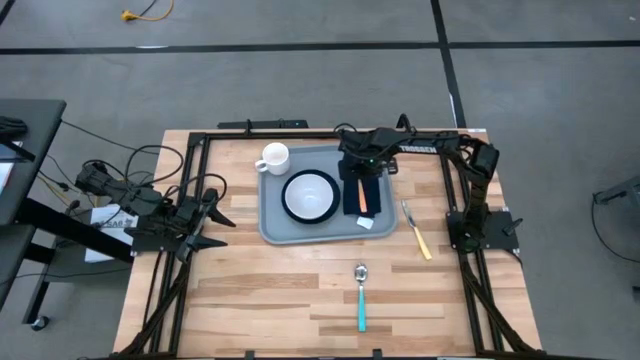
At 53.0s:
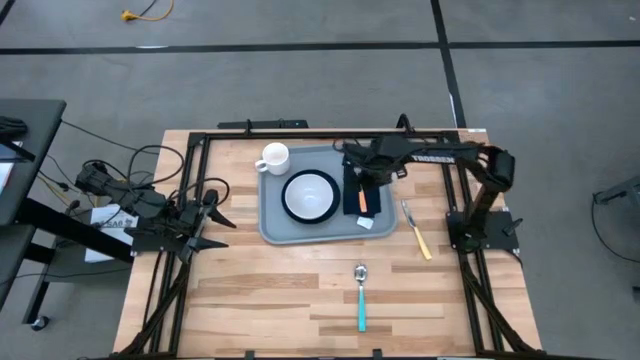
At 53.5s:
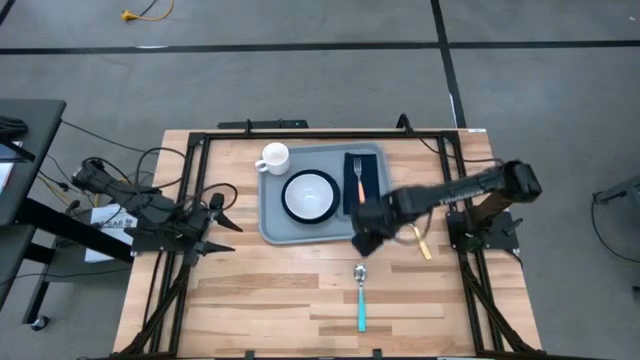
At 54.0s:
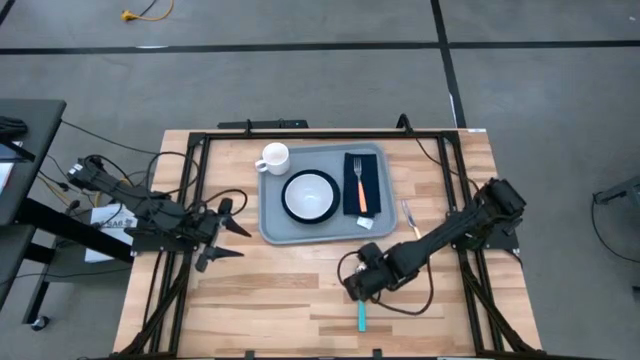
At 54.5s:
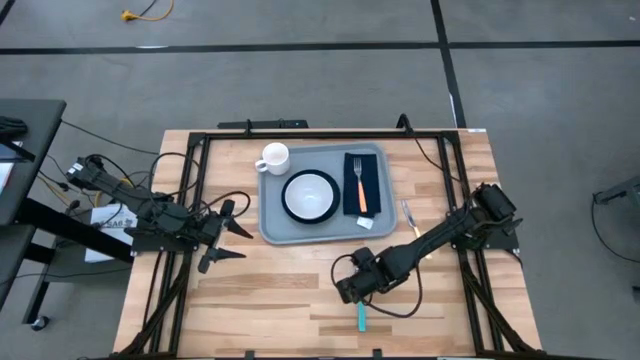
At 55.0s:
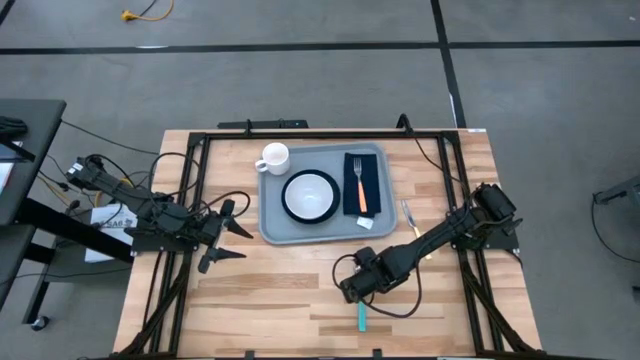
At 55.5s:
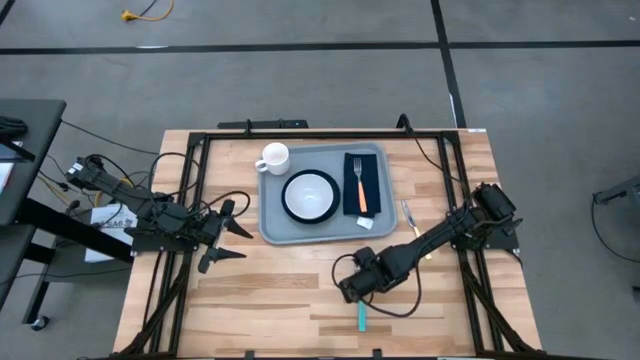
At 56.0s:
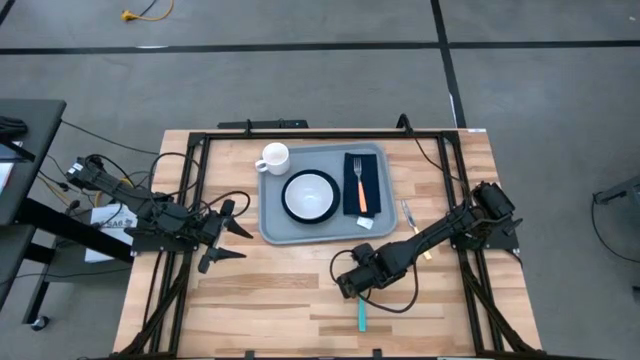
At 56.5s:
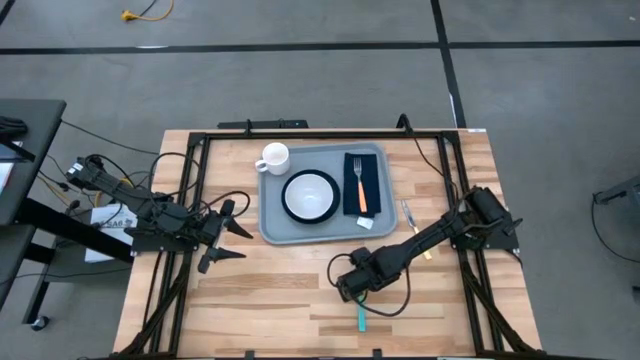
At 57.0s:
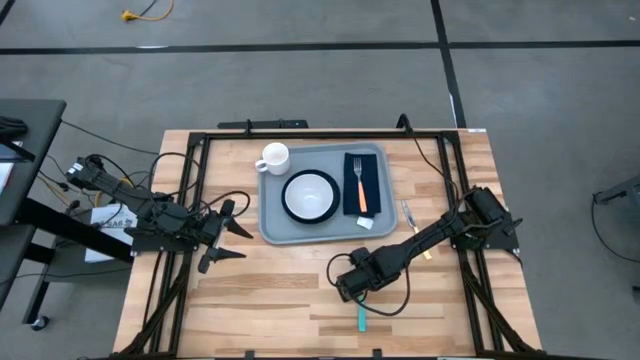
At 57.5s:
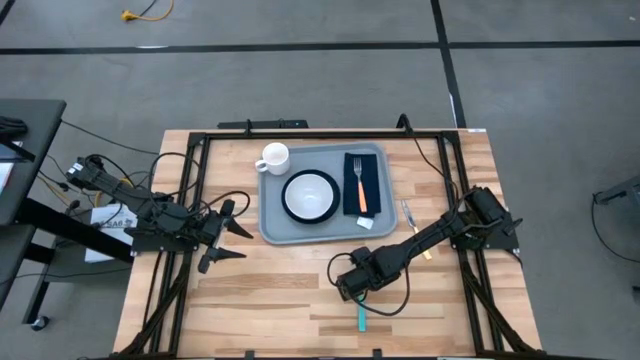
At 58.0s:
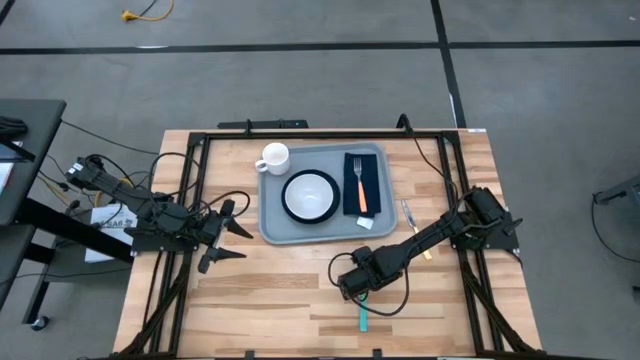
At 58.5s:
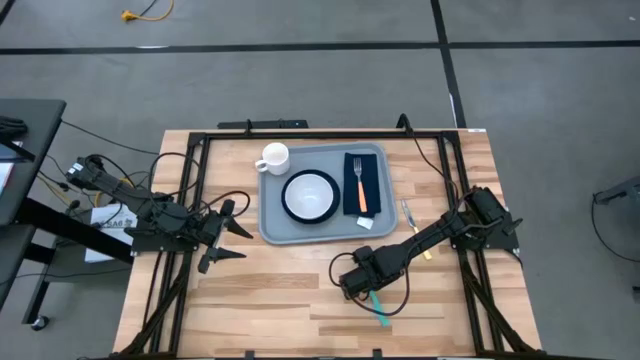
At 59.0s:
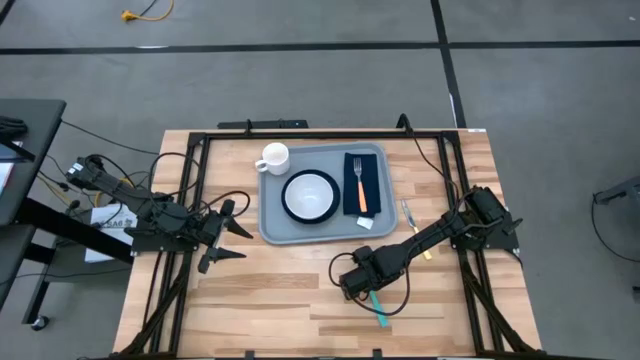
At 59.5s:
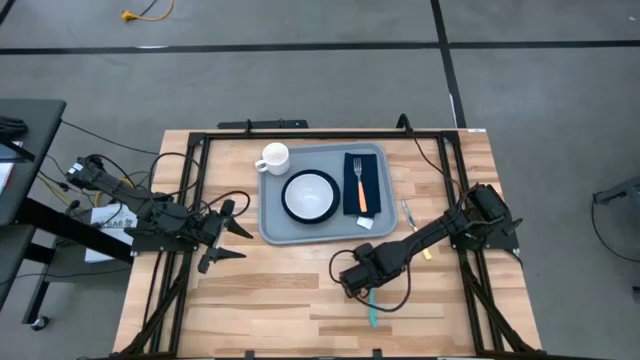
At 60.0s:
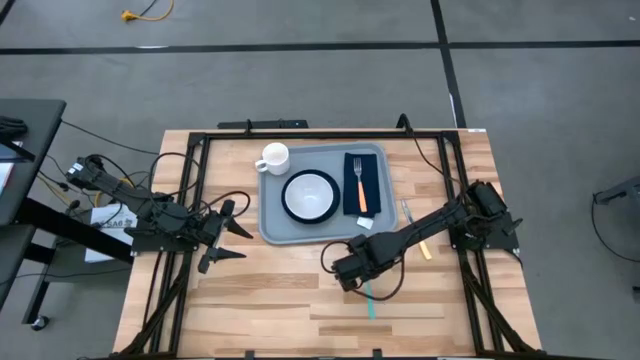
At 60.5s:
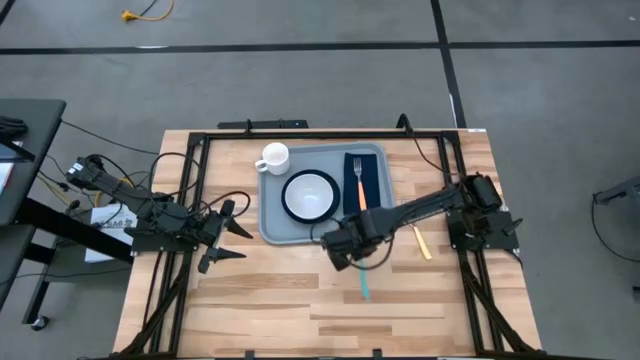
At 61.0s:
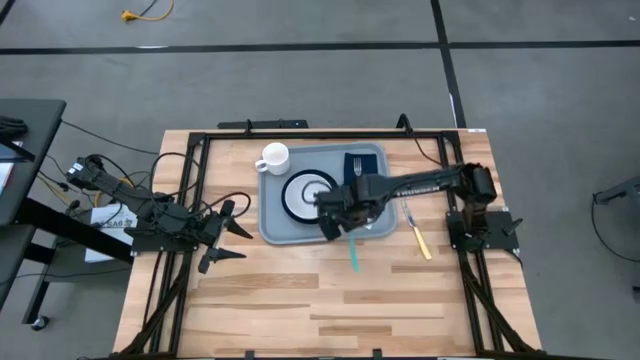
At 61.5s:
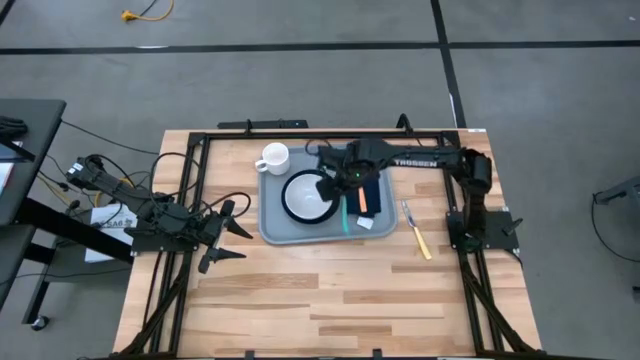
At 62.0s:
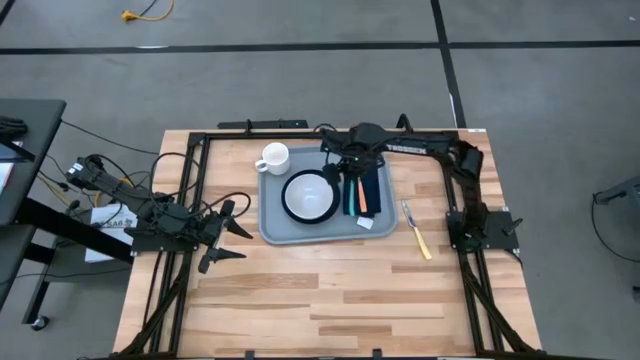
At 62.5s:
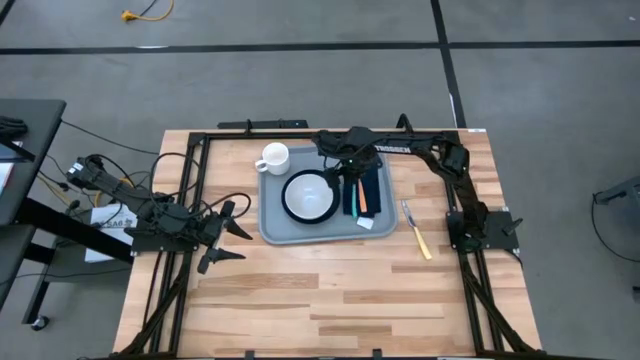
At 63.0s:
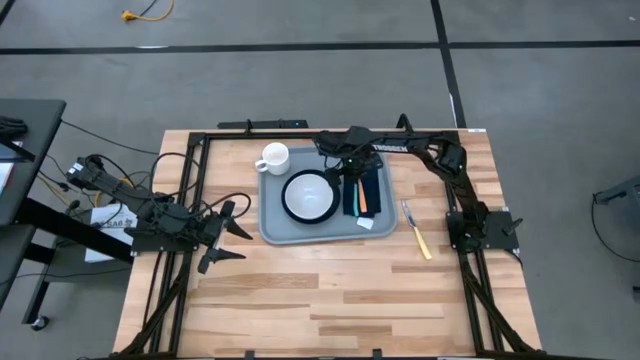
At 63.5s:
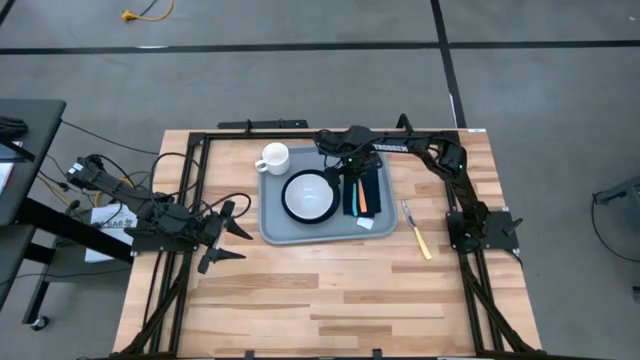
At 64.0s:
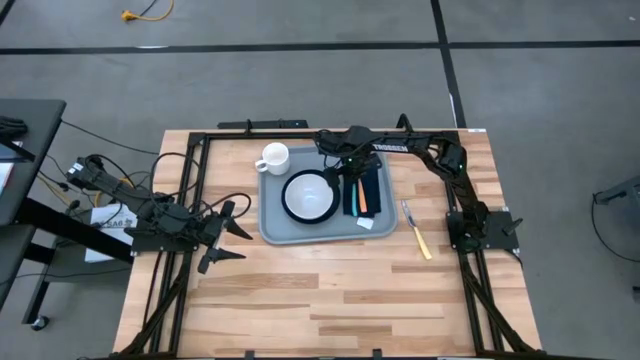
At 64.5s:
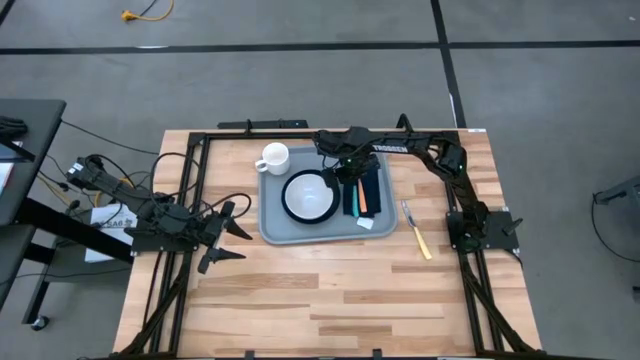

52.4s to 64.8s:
Task: Set up tray
Put the green spoon on top of the blue table napkin on the gray serving tray to the left of the orange fork

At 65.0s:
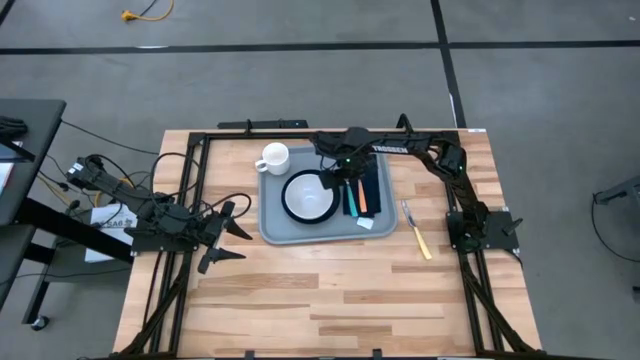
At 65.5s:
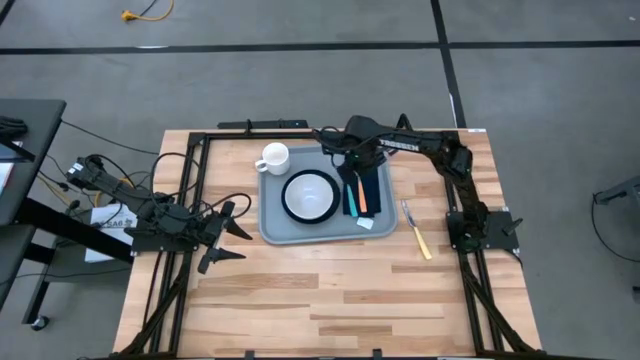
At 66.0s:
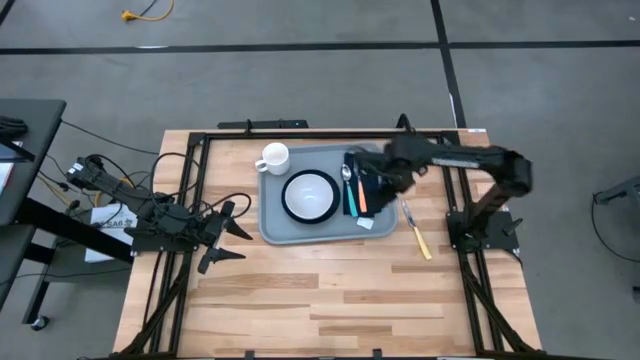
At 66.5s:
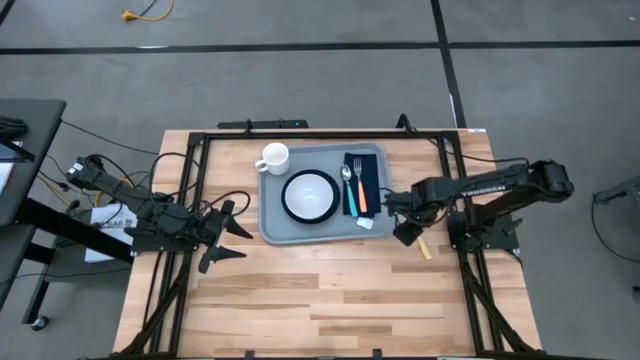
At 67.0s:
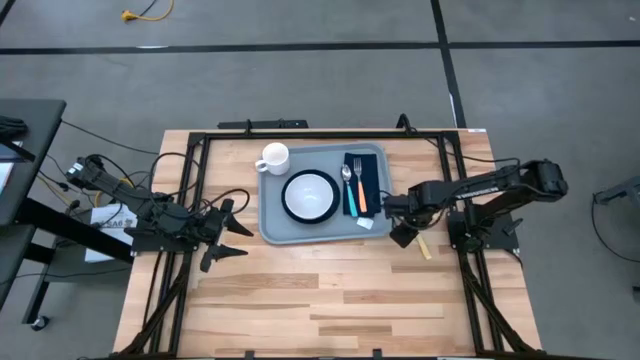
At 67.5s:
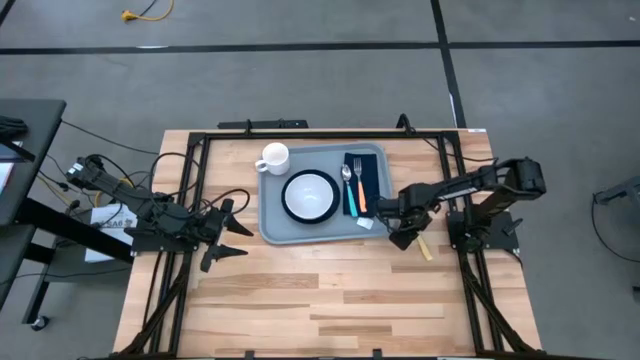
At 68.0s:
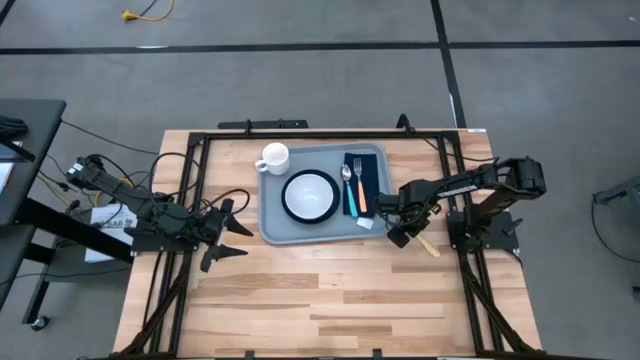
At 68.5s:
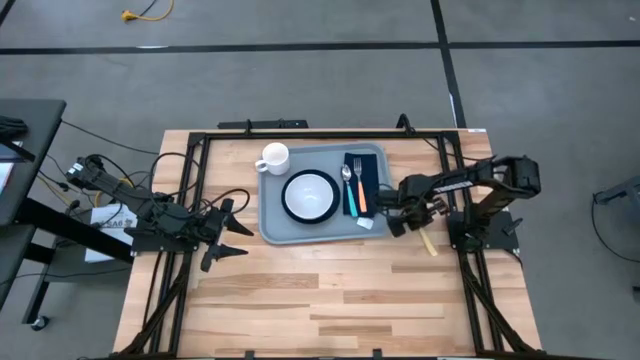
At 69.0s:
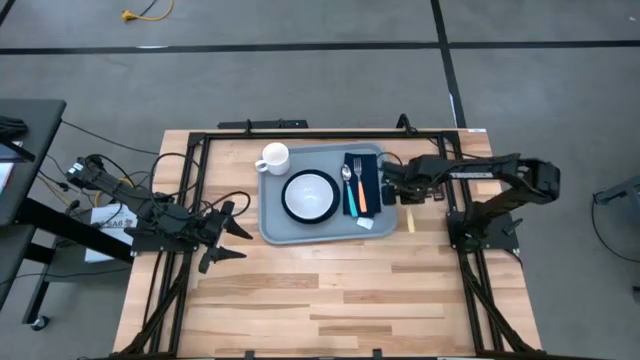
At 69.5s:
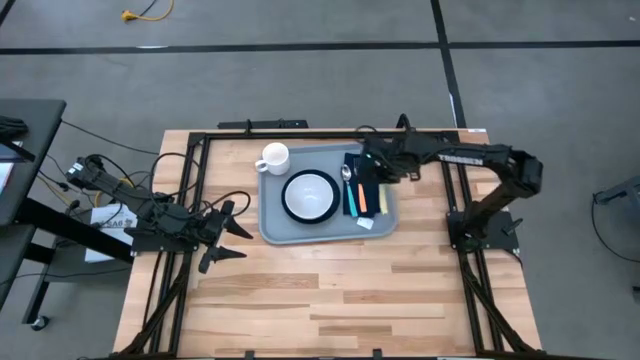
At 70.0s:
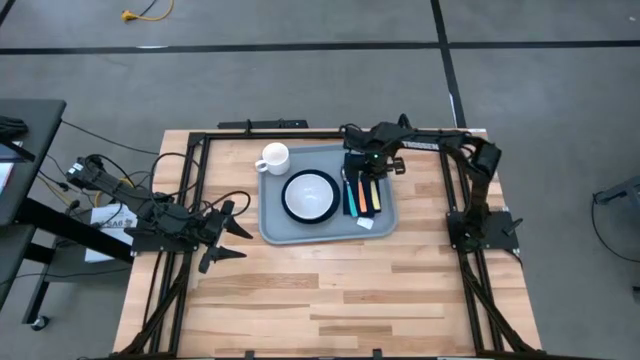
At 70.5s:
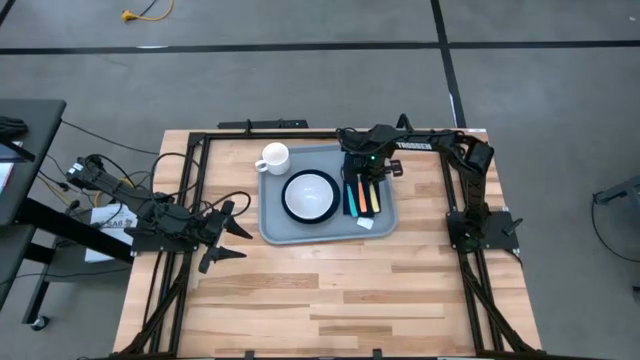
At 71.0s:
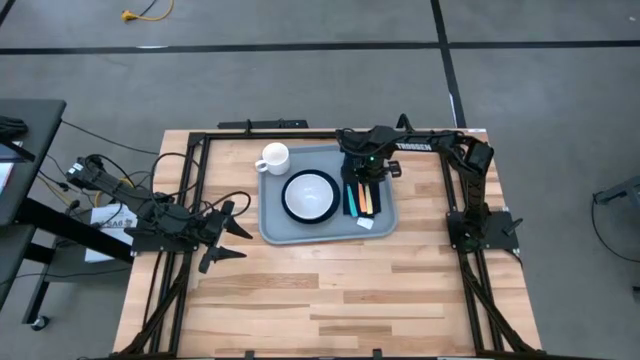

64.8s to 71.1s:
Put the yellow knife on top of the blue table napkin on the gray serving tray to the right of the orange fork

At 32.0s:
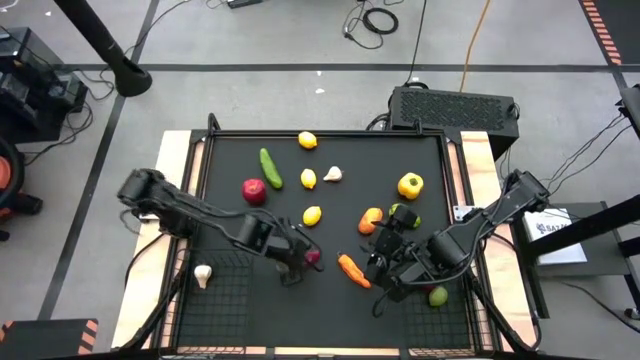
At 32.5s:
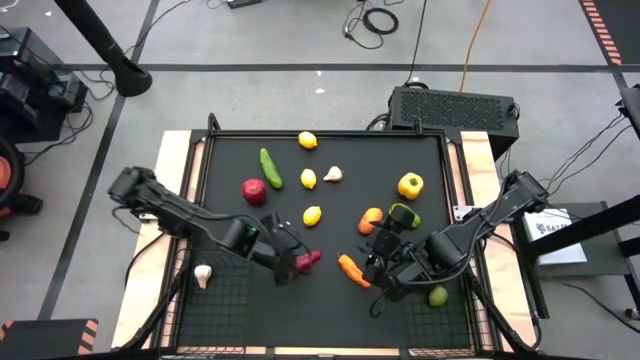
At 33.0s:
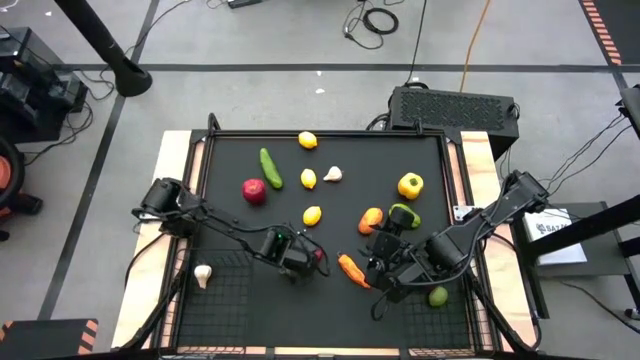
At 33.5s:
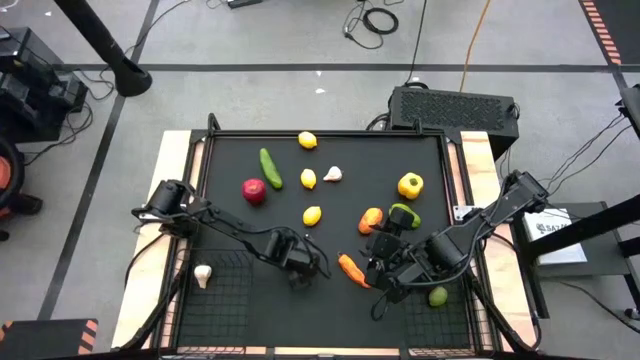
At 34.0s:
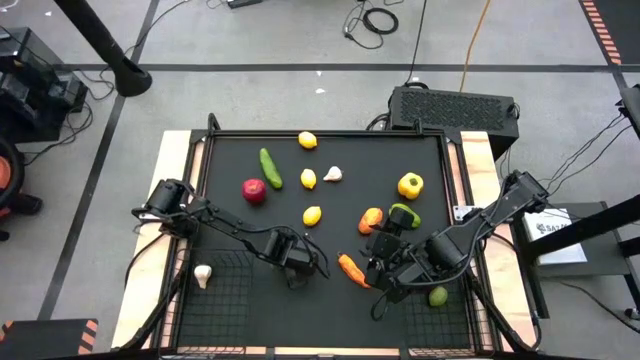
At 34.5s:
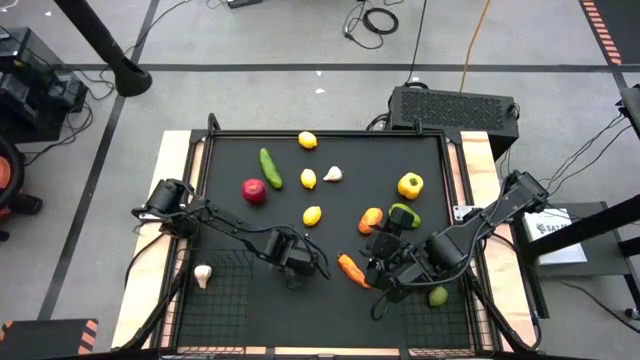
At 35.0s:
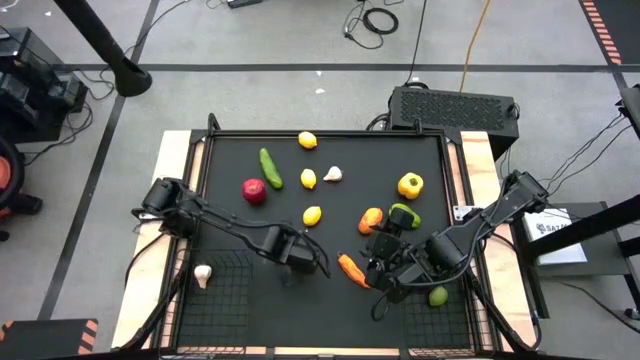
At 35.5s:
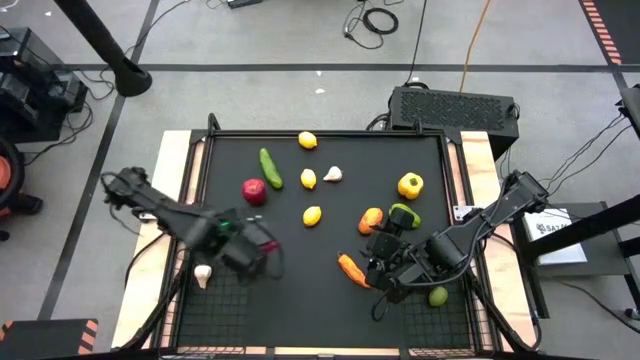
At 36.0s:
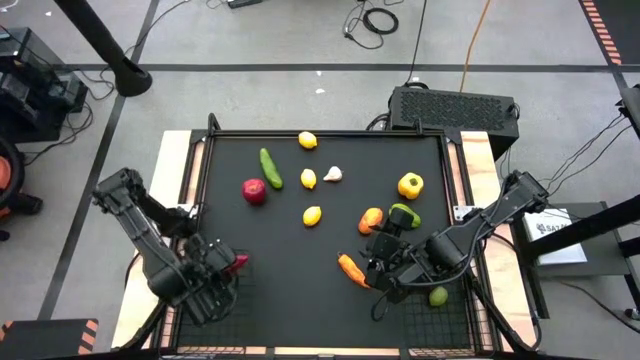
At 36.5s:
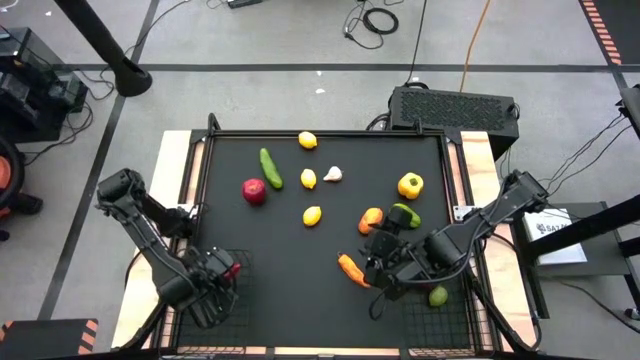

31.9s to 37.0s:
Task: Sort produce into baskets
Put the red pepper into the bottom left basket
